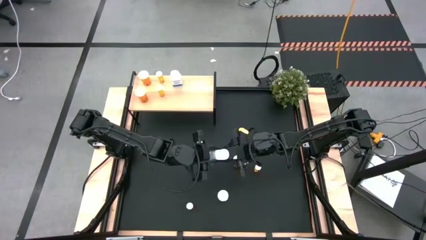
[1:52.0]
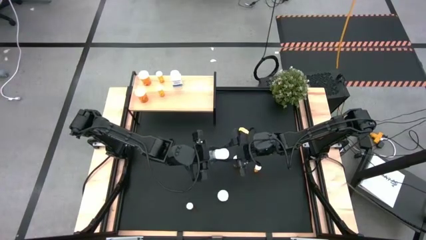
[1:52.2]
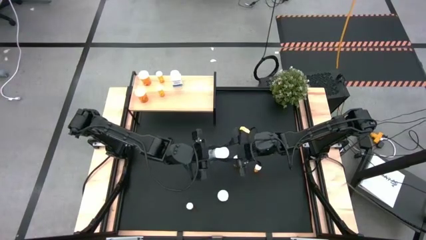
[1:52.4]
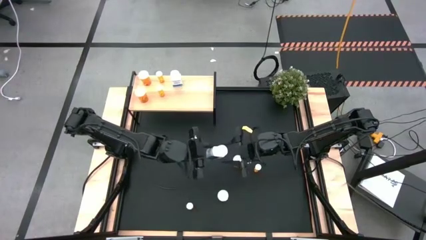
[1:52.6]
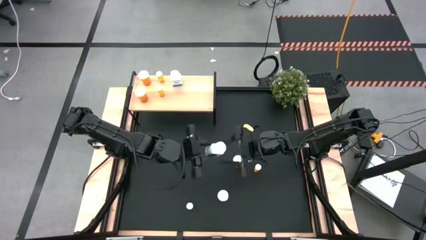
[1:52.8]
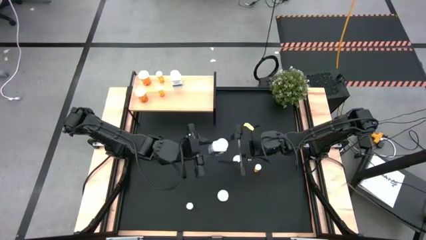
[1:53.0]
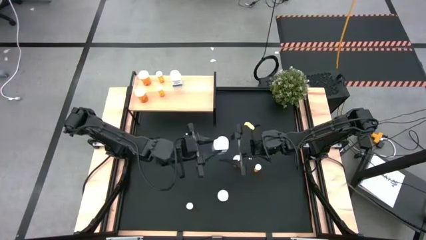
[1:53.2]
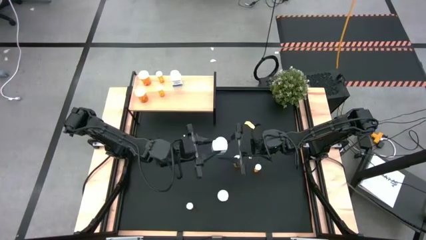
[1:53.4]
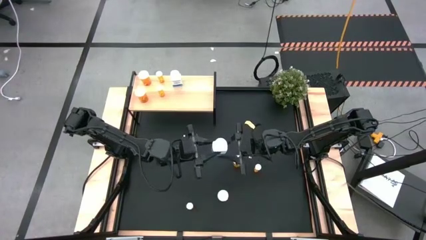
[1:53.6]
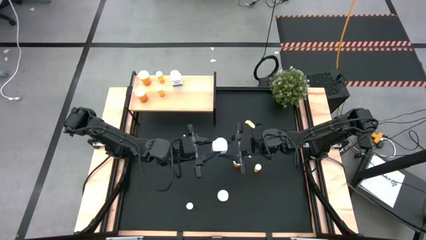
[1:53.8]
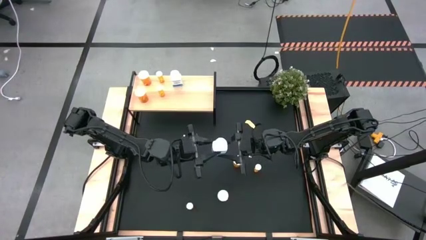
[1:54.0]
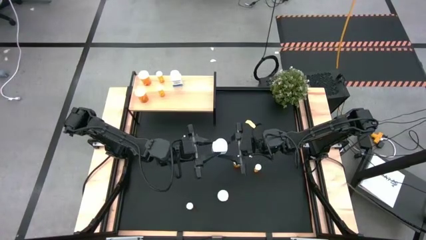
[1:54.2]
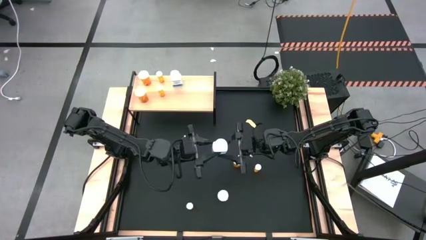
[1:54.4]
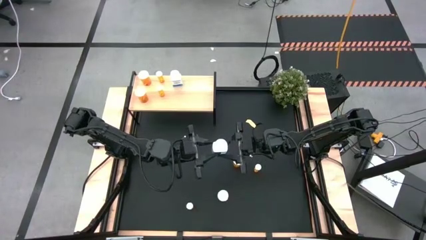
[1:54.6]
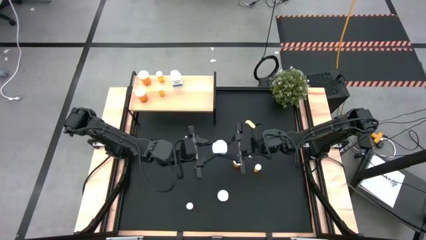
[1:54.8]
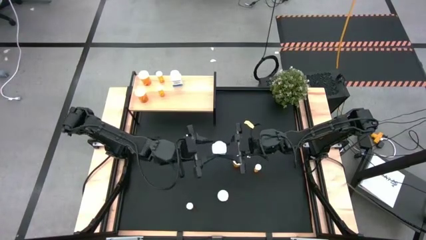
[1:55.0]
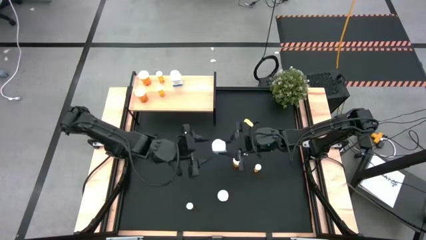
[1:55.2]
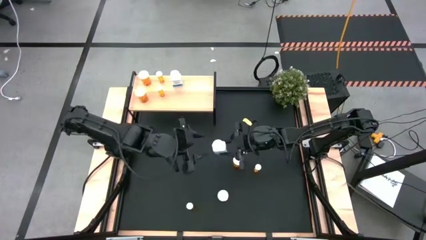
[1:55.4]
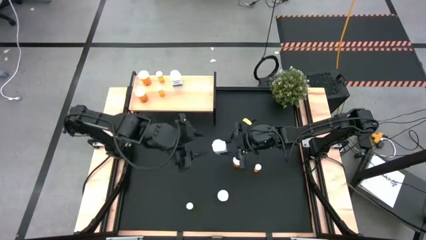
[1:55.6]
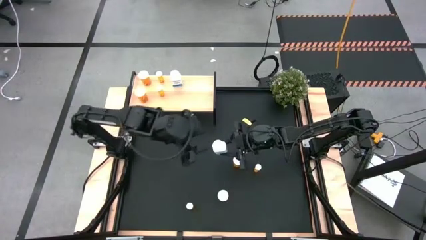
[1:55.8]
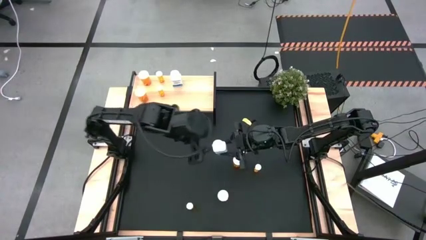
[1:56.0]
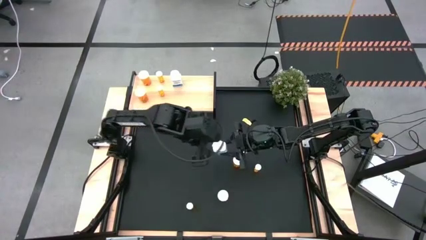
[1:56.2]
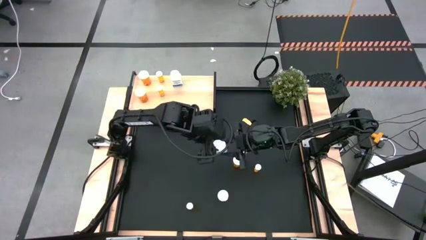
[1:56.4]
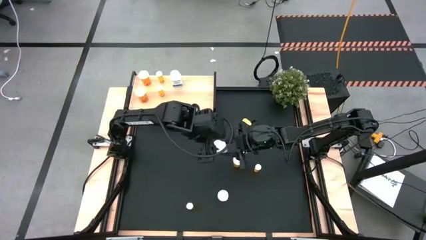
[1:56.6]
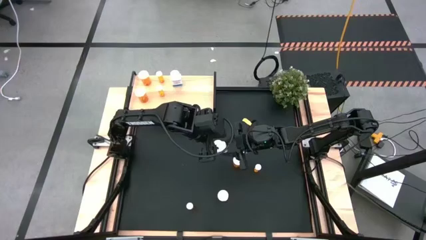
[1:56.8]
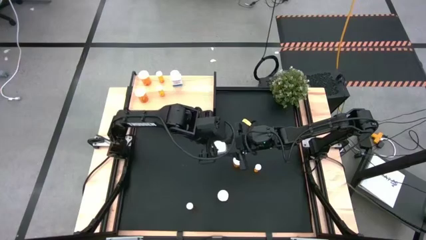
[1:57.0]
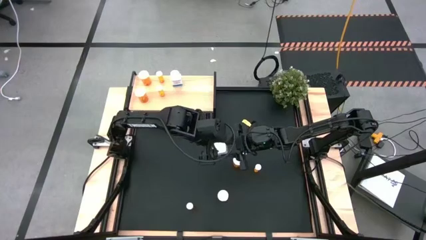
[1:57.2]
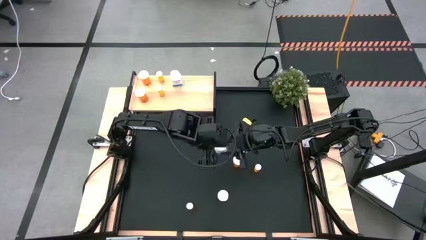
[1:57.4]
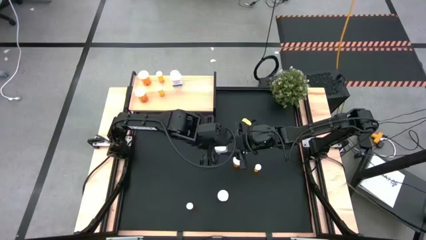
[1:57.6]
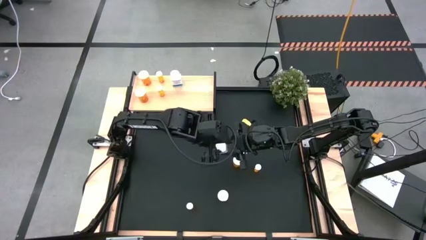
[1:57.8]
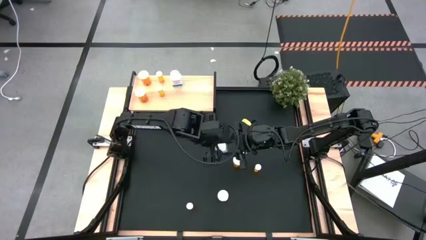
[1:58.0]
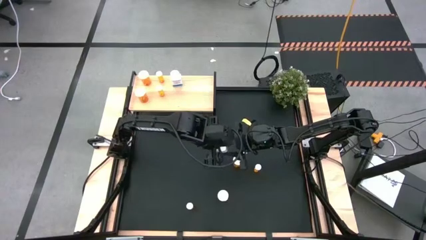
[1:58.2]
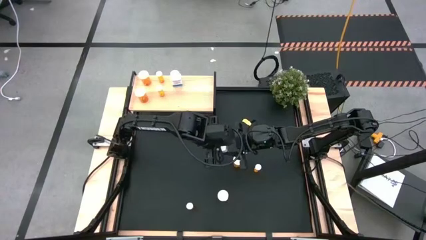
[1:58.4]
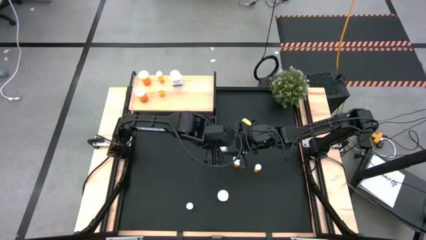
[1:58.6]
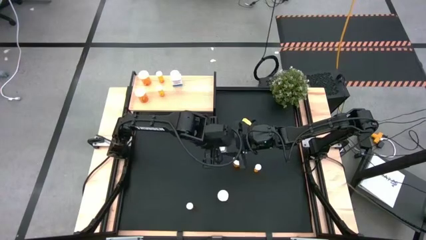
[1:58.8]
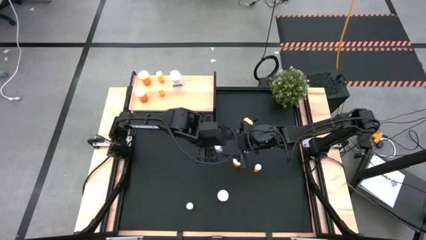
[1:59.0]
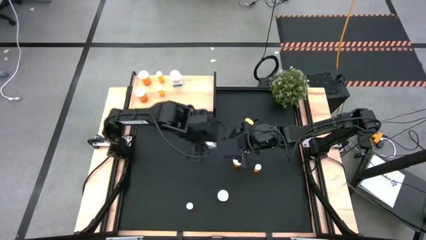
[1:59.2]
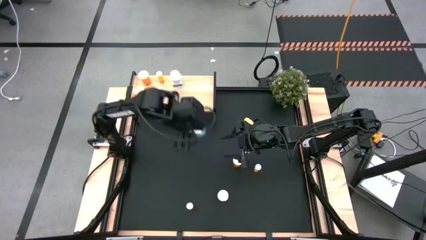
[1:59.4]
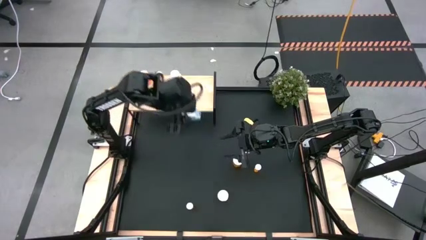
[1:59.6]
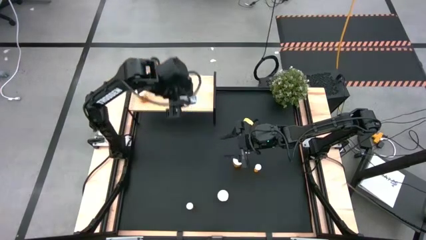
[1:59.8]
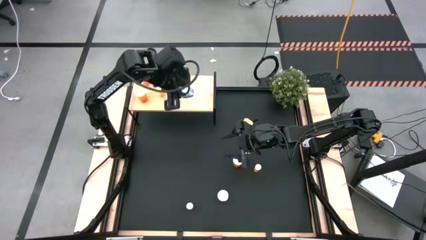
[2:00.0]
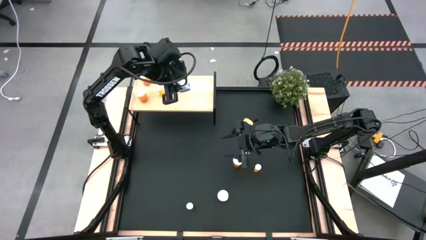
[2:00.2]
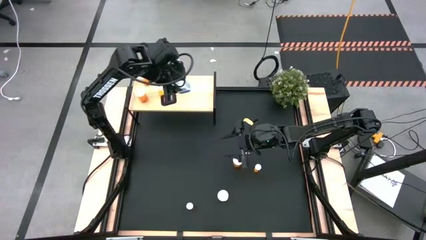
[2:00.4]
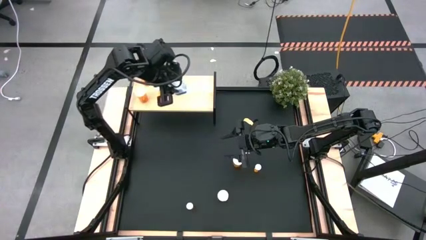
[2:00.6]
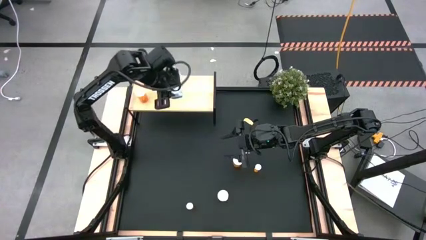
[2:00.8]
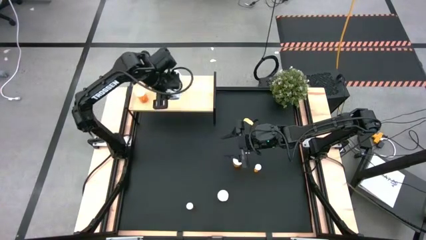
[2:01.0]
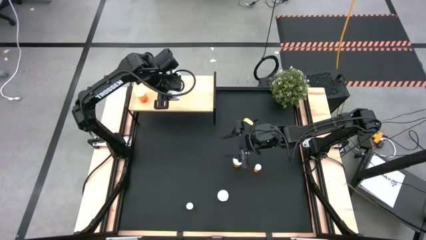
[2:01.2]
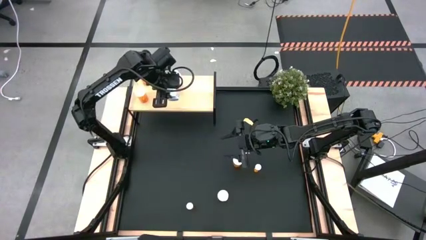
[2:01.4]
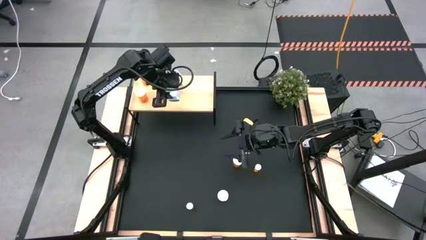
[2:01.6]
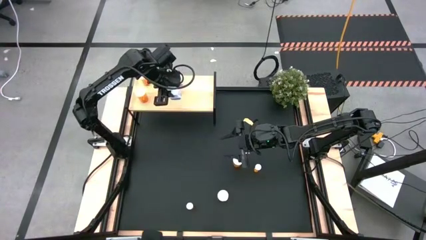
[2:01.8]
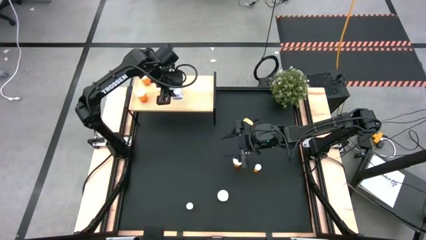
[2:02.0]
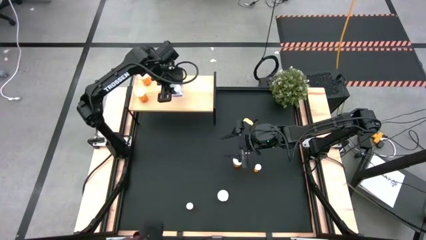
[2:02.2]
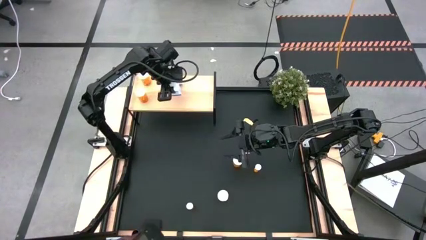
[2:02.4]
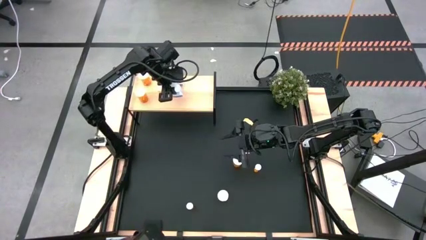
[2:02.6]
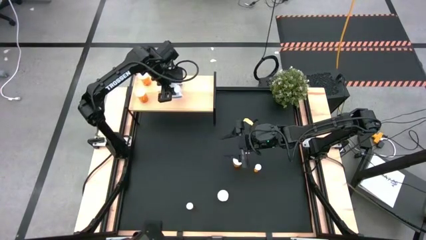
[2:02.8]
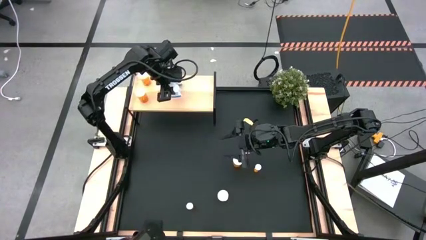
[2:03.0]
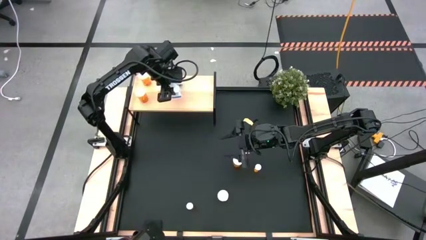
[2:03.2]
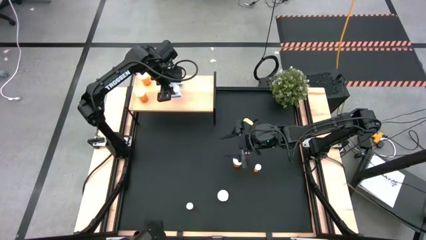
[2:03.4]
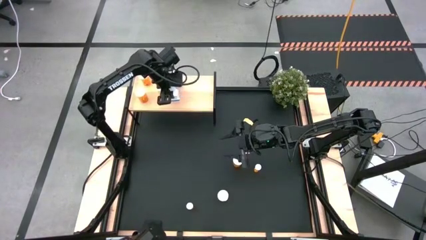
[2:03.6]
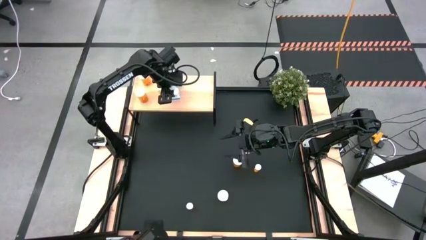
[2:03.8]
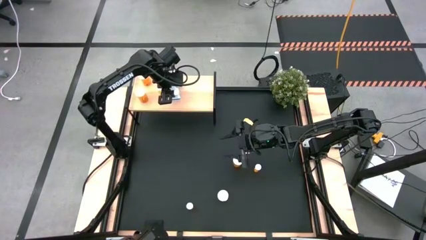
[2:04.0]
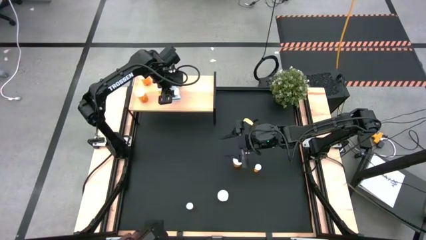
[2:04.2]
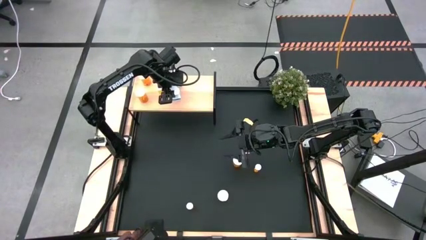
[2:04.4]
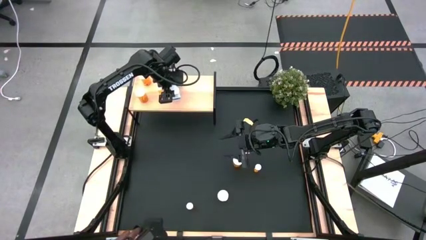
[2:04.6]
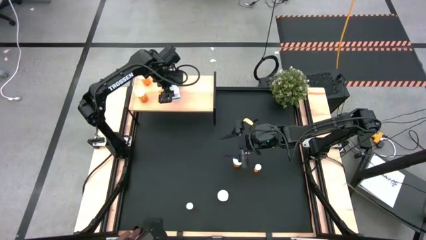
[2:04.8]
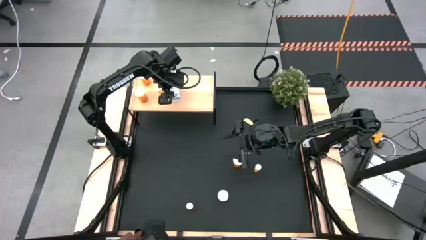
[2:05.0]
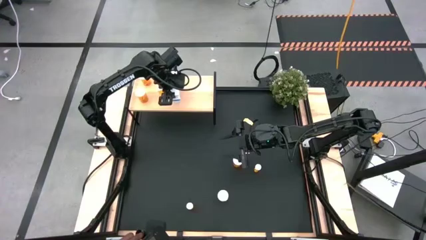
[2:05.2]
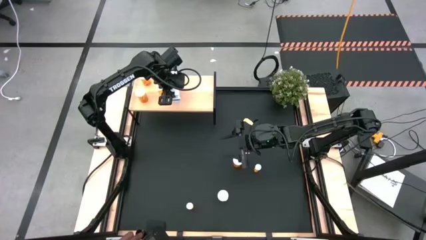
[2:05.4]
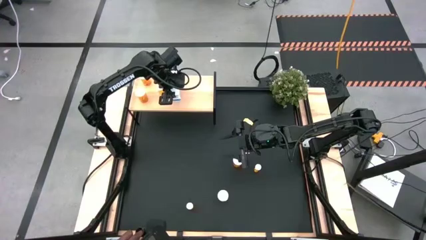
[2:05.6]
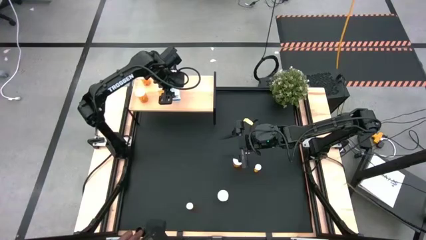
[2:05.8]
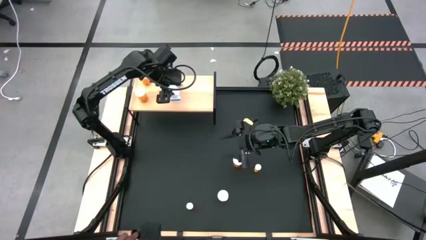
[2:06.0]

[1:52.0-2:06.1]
Task: Pick and place medicine bottles onto shelf by color
Put the white pill bottle on the shelf aligned with the other white pill bottle
